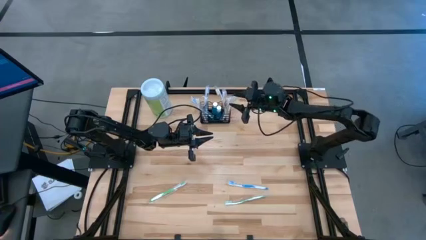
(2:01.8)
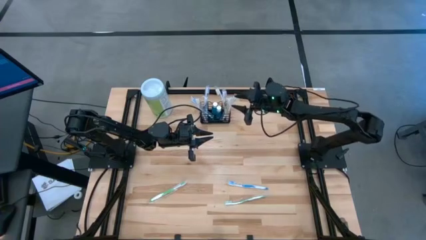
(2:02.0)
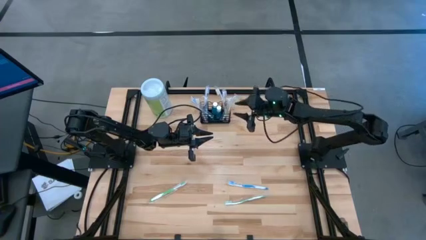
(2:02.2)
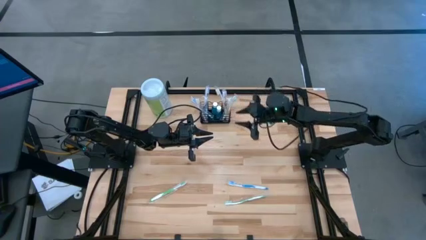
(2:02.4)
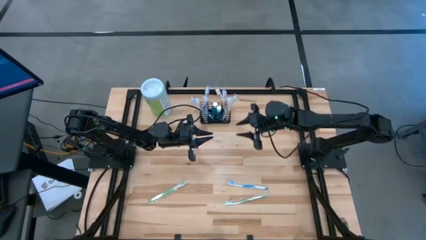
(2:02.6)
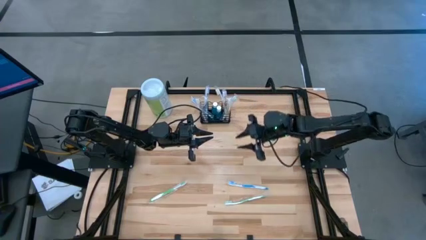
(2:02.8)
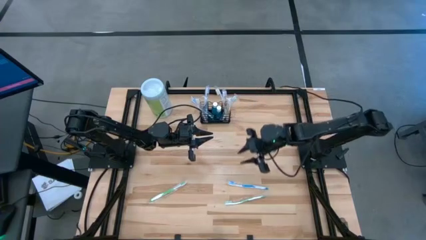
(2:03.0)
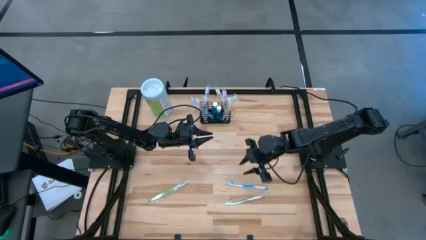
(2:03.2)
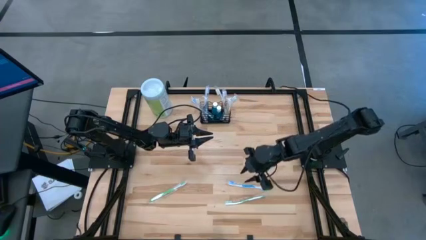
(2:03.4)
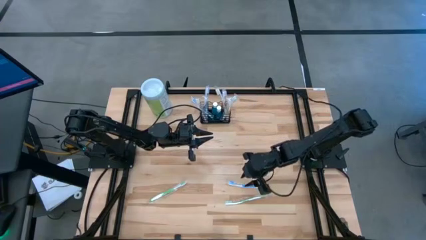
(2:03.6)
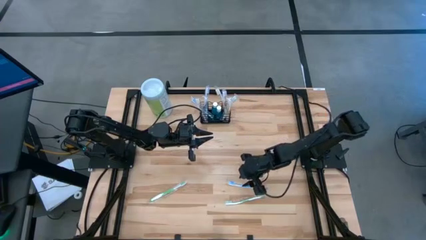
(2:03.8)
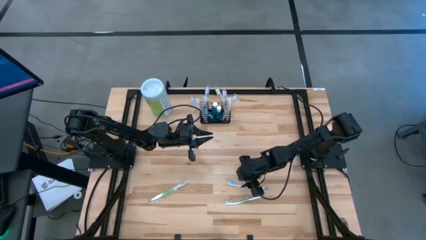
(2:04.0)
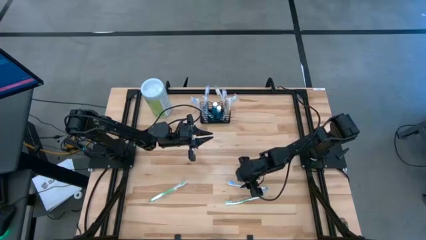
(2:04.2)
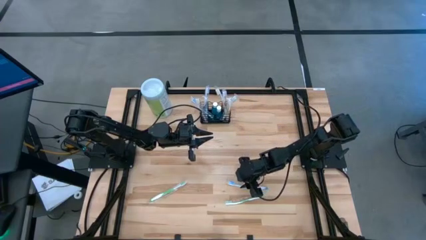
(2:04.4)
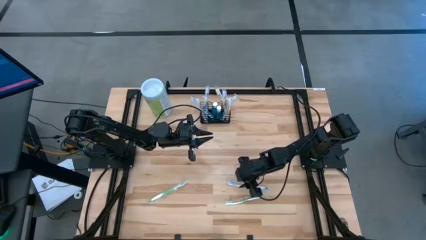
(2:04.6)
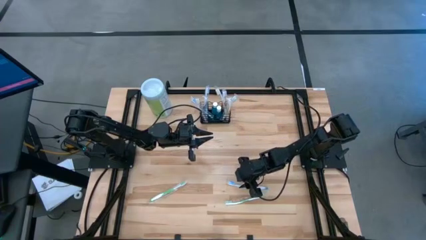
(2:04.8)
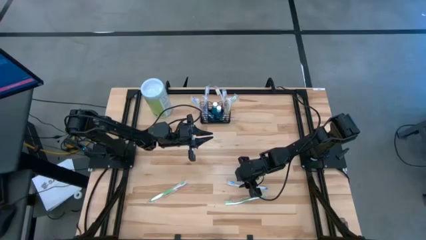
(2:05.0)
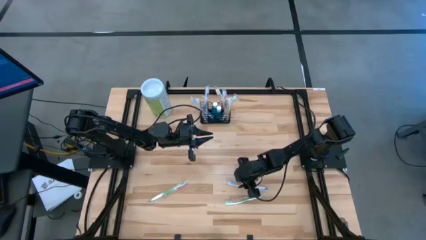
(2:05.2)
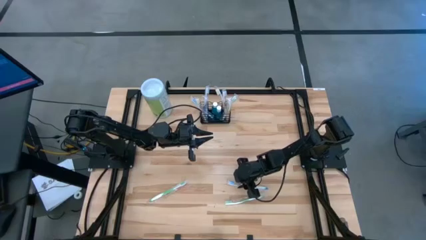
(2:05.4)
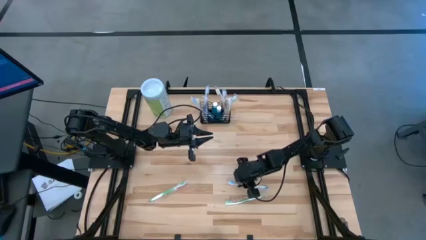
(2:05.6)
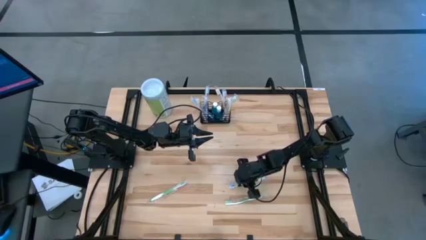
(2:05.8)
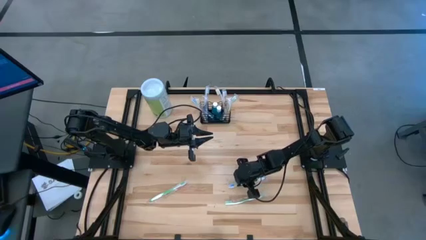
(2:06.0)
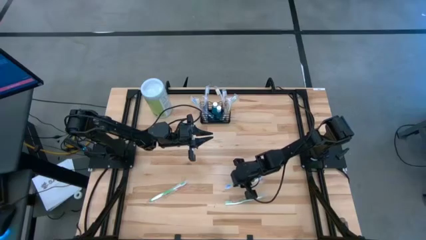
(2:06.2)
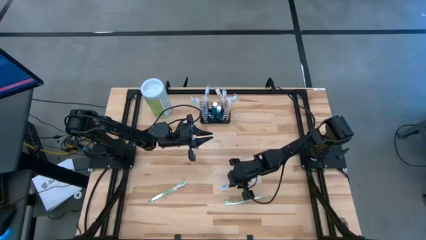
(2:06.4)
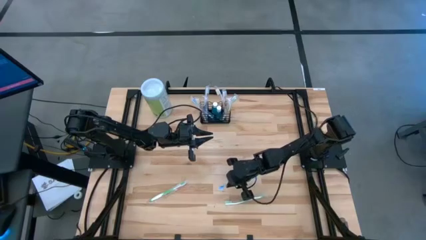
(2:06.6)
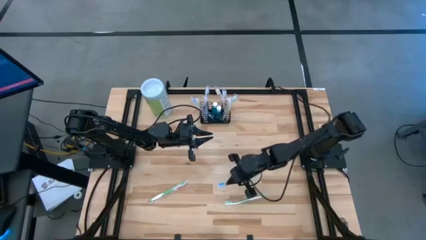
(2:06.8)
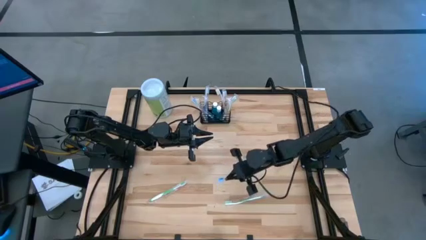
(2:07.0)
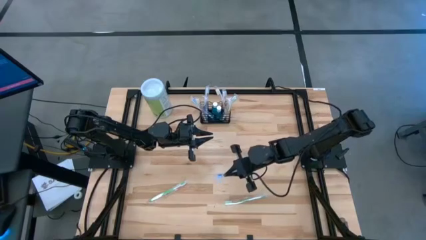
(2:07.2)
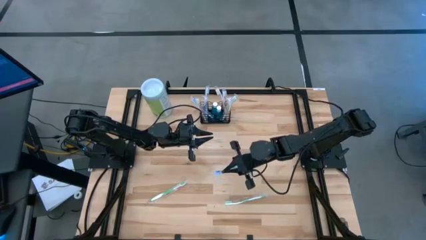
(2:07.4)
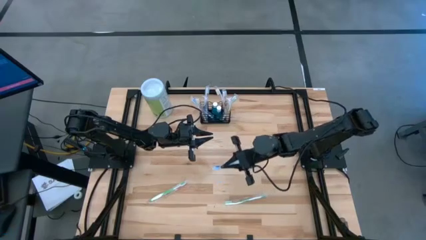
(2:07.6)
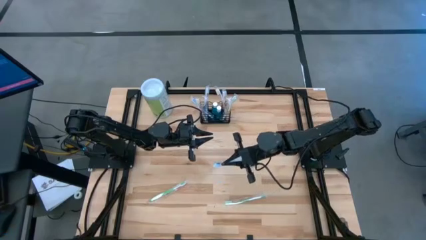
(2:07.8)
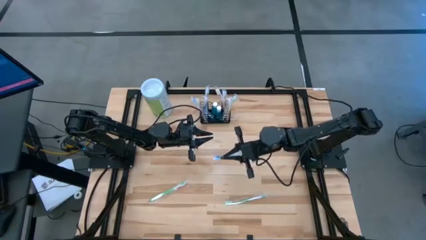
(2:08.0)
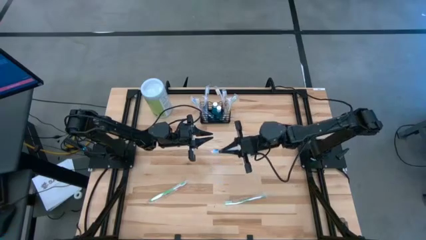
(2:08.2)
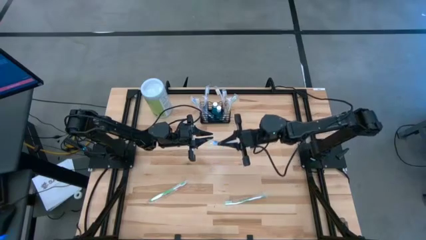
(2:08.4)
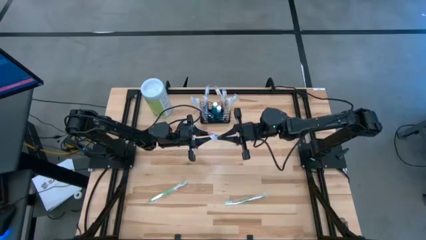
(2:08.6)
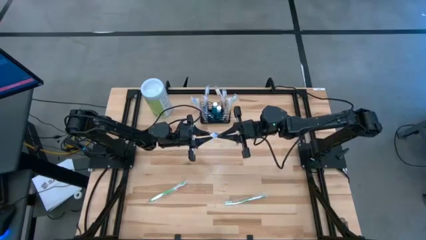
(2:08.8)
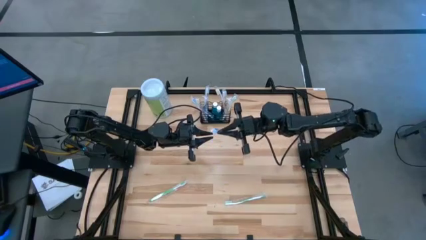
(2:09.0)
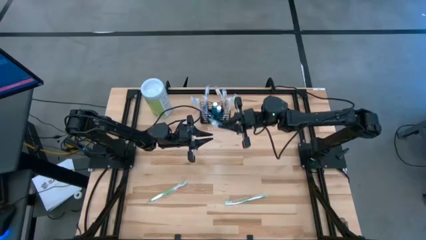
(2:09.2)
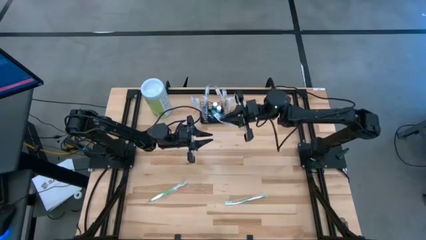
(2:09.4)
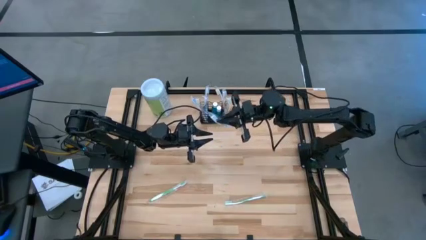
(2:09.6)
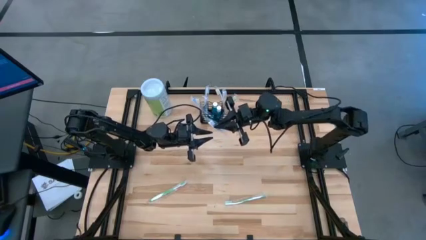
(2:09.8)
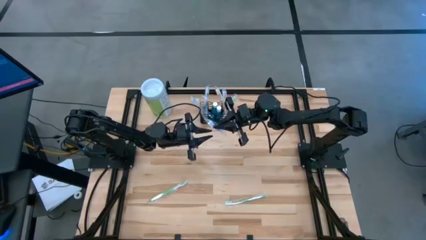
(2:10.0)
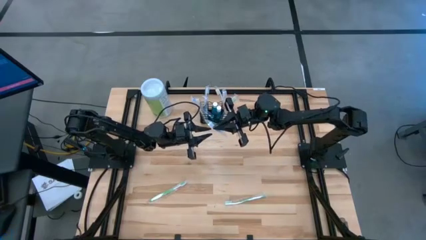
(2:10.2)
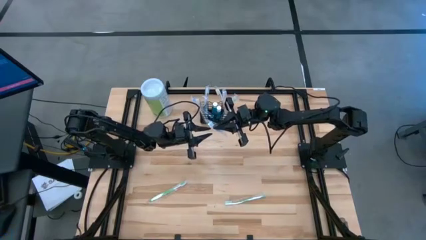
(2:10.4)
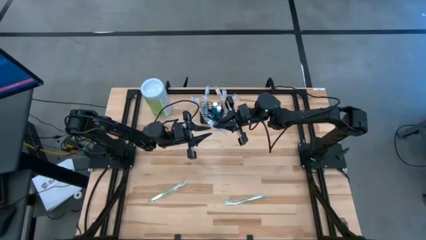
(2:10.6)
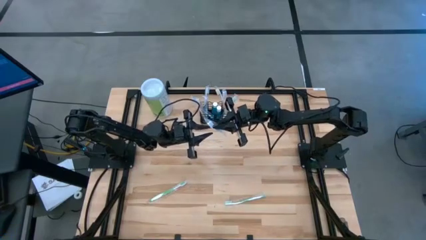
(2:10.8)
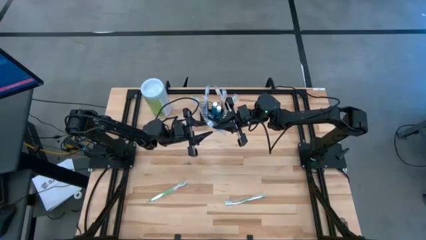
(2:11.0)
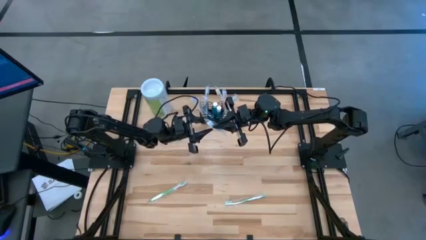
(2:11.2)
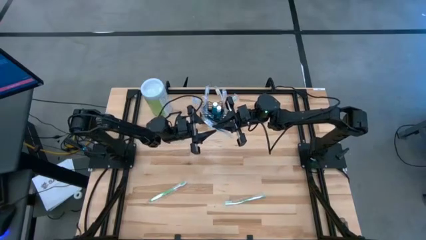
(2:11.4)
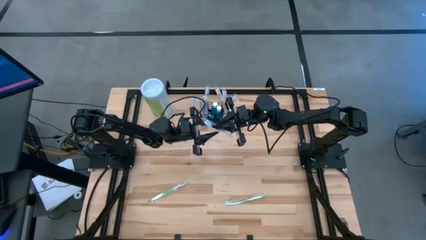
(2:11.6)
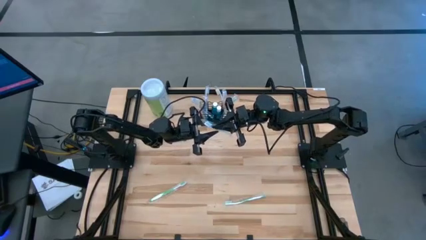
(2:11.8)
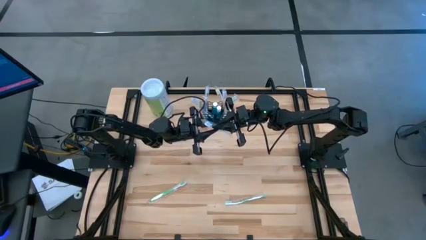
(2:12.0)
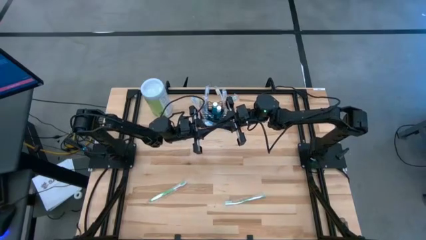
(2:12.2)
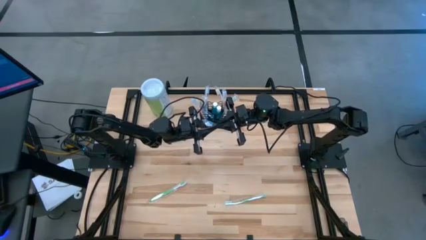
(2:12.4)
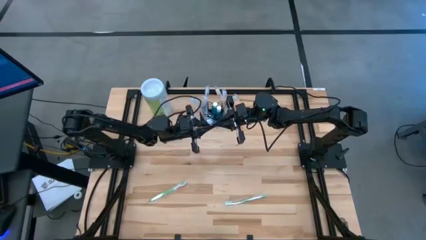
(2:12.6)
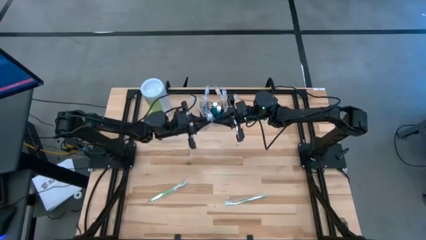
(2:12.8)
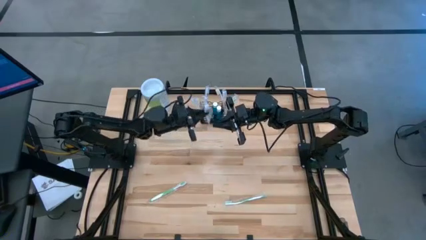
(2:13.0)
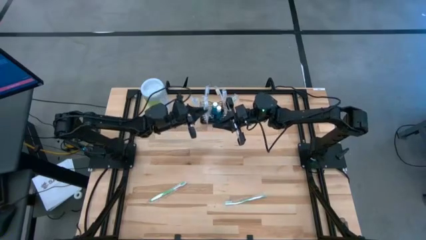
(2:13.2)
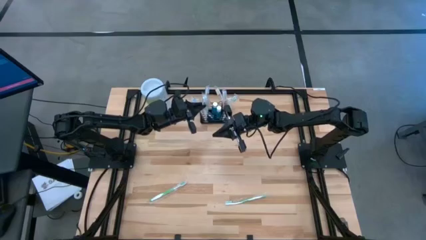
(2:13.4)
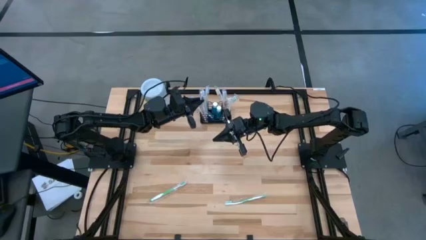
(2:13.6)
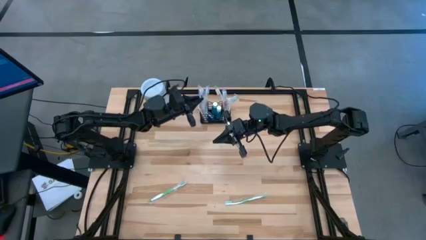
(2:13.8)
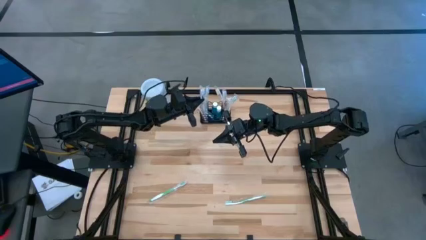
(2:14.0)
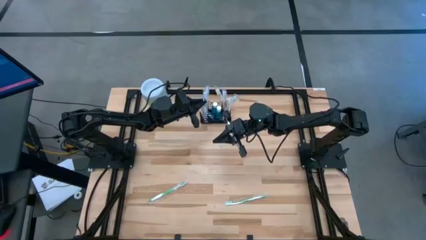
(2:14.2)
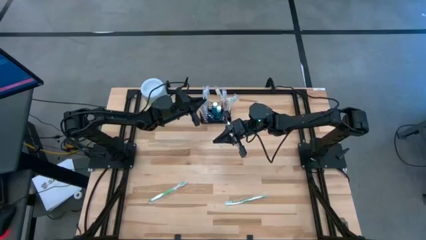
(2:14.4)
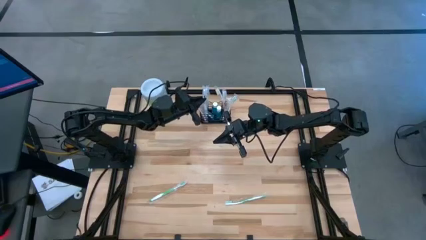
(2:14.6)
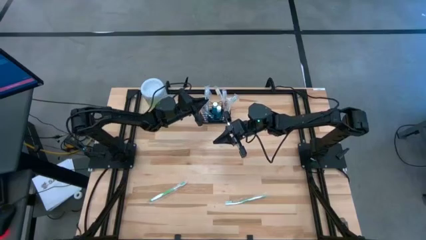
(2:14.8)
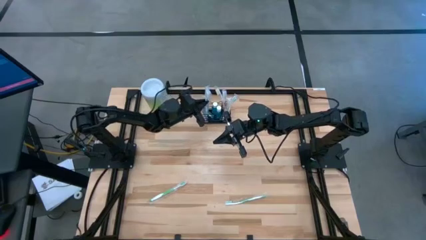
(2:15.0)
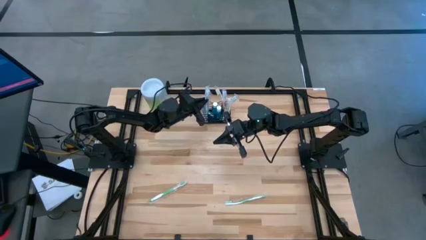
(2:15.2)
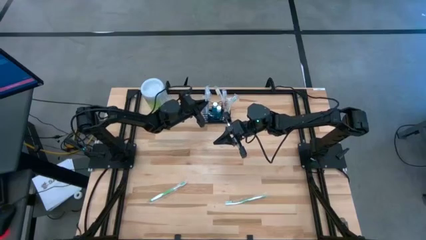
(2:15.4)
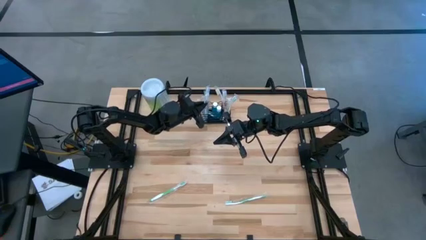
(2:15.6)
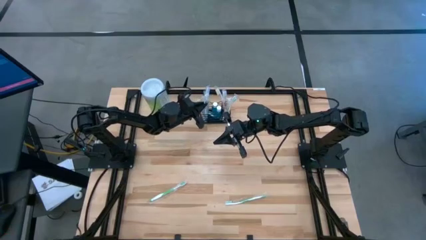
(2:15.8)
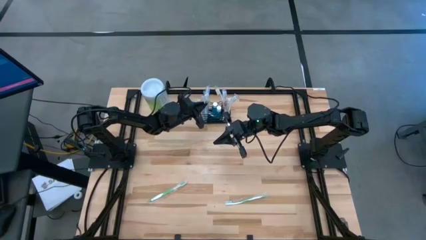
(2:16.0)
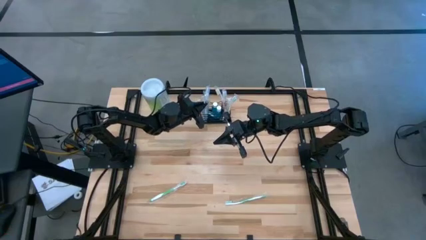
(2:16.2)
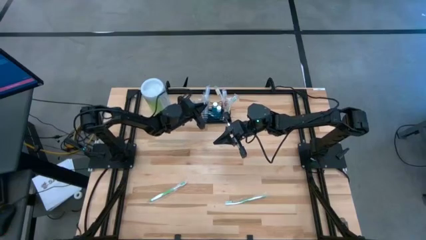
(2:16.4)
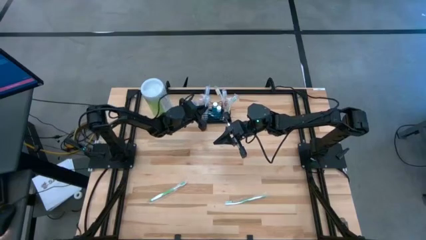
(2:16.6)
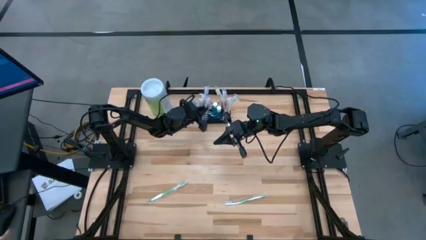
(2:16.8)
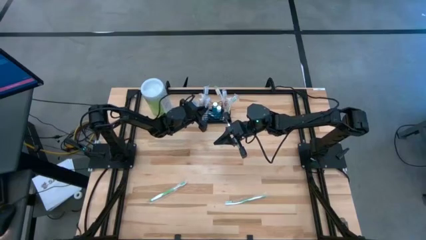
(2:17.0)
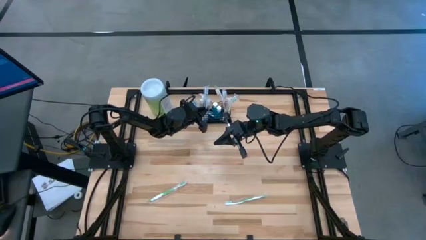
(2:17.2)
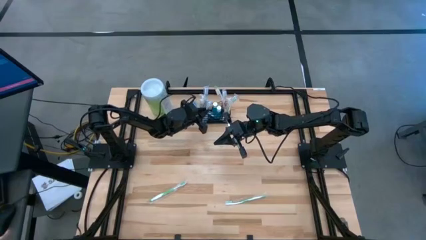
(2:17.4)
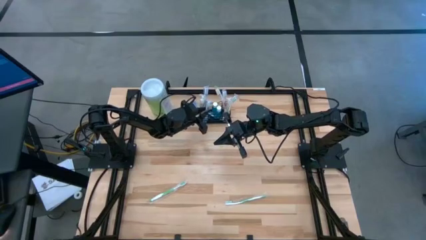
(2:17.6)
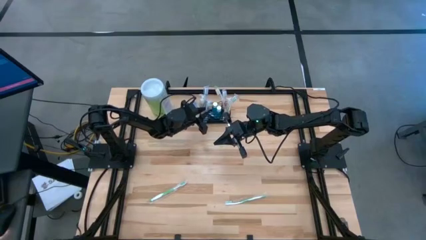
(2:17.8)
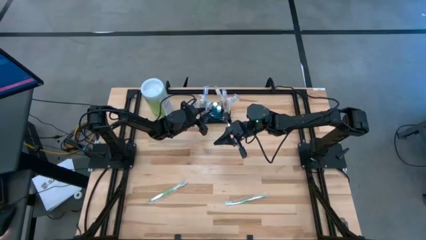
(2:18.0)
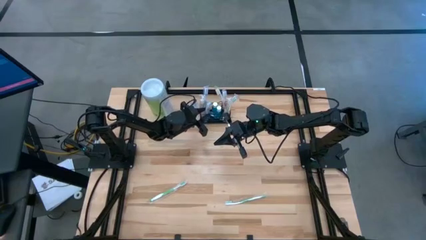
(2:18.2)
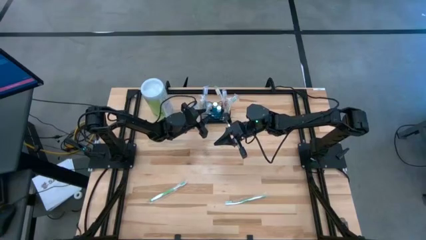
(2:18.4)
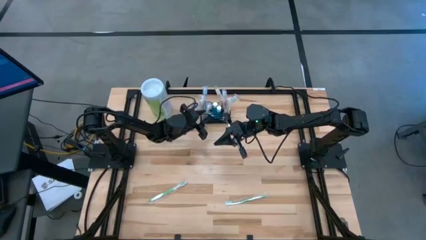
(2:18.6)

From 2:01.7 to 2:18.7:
Task: Pick & Place toothbrushing station
Put the blue toothbrush into the black wire organizer
